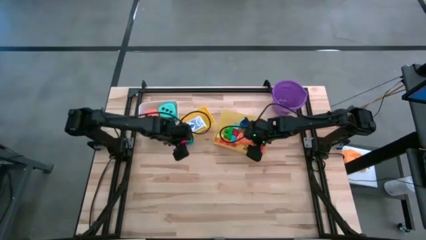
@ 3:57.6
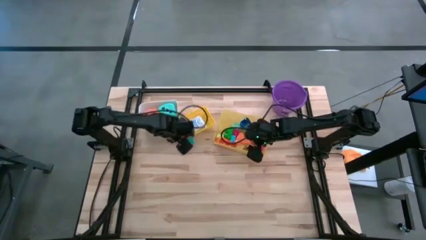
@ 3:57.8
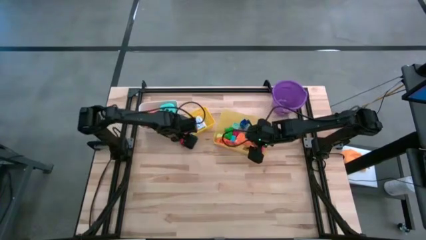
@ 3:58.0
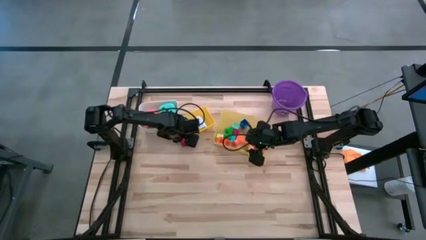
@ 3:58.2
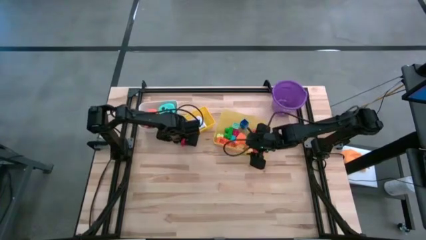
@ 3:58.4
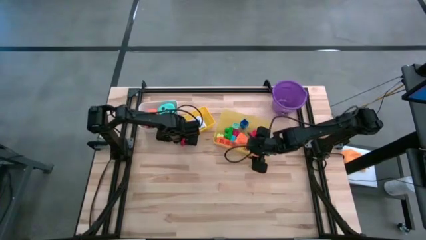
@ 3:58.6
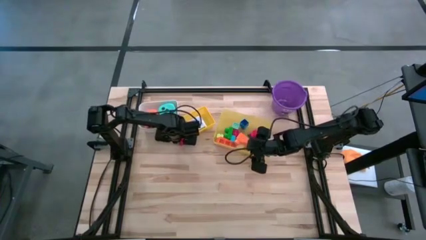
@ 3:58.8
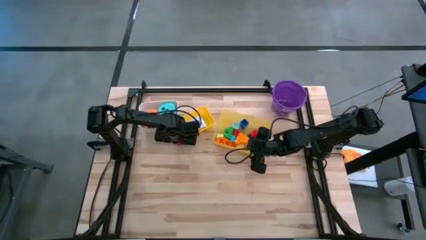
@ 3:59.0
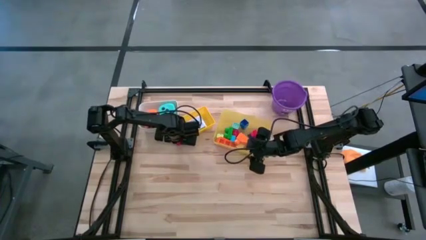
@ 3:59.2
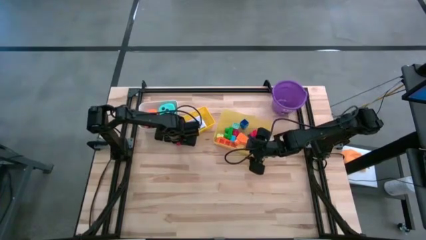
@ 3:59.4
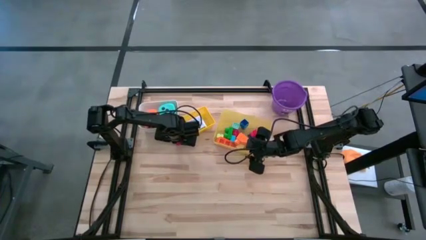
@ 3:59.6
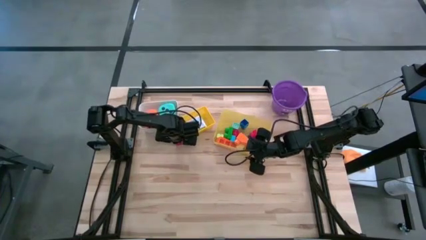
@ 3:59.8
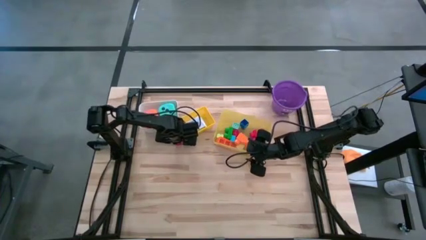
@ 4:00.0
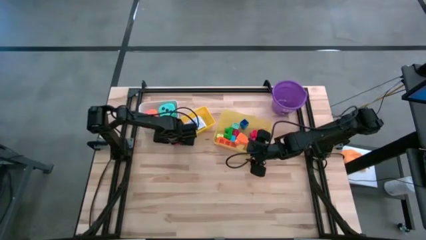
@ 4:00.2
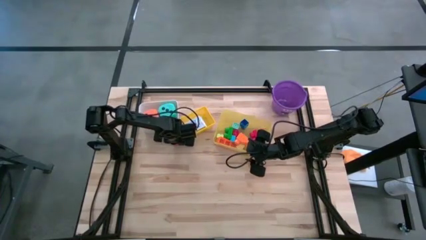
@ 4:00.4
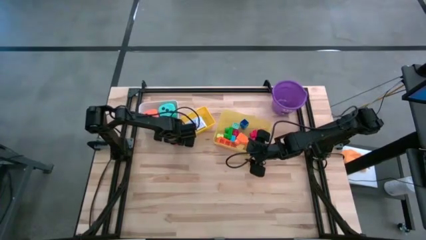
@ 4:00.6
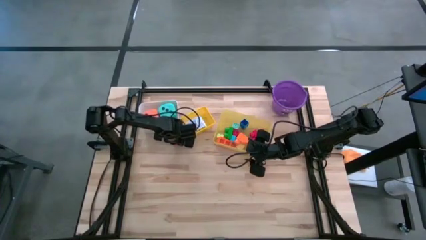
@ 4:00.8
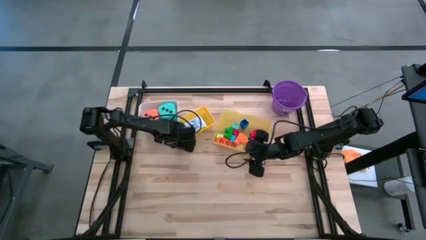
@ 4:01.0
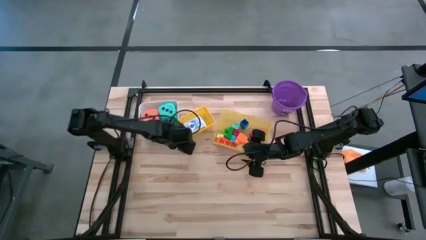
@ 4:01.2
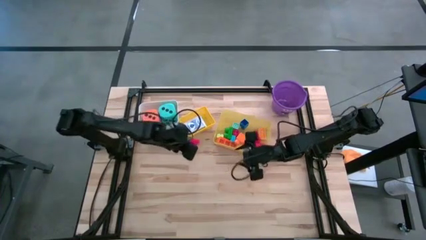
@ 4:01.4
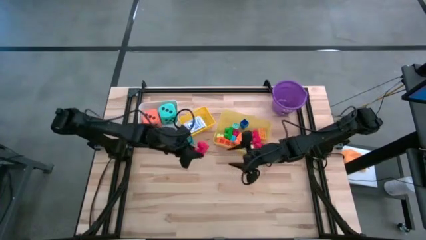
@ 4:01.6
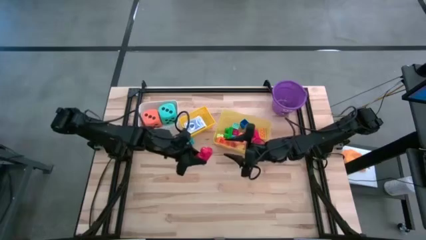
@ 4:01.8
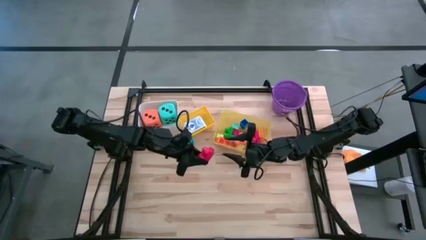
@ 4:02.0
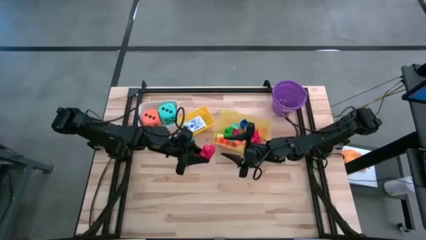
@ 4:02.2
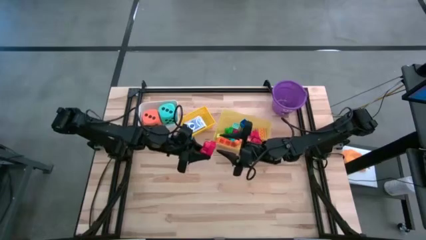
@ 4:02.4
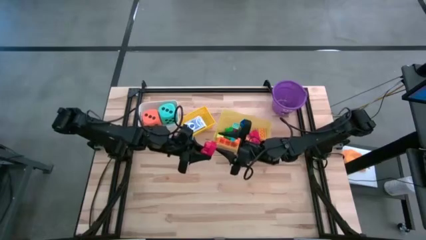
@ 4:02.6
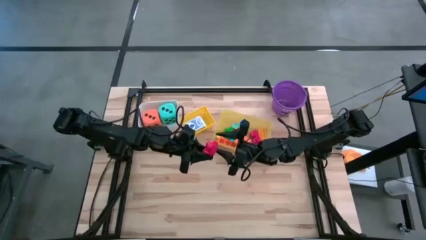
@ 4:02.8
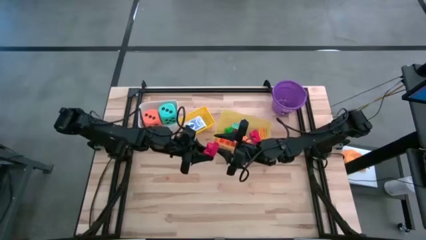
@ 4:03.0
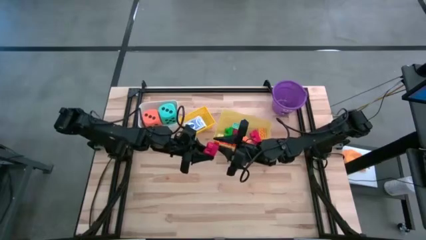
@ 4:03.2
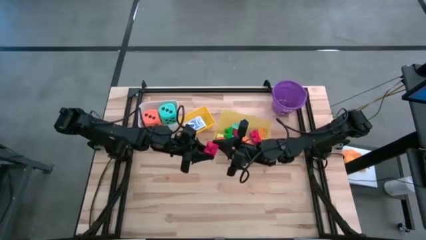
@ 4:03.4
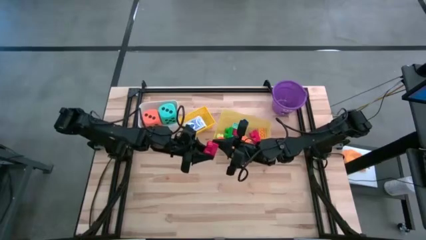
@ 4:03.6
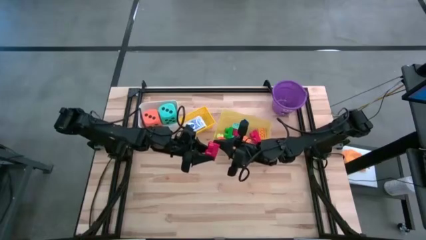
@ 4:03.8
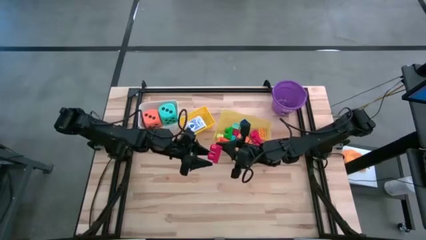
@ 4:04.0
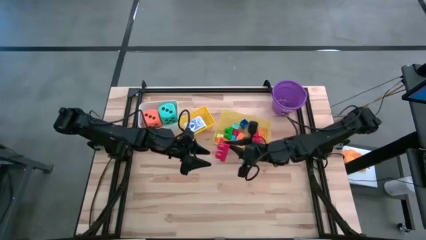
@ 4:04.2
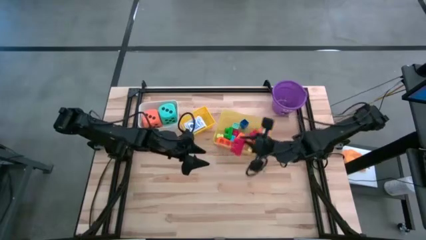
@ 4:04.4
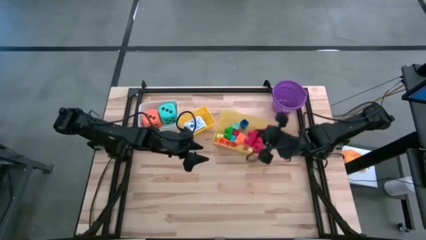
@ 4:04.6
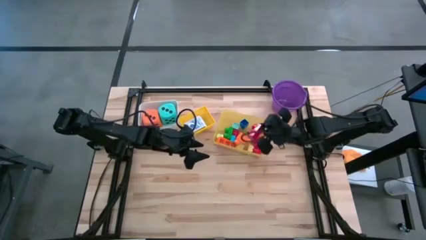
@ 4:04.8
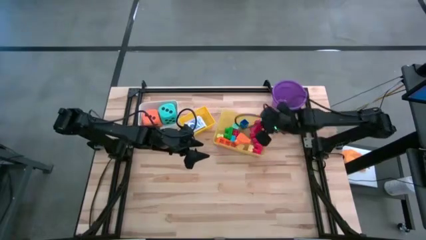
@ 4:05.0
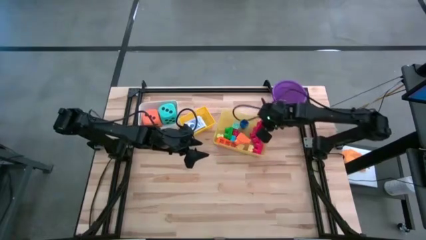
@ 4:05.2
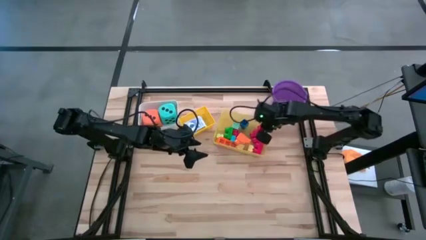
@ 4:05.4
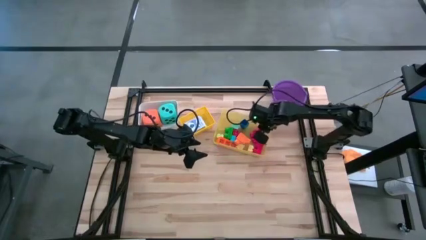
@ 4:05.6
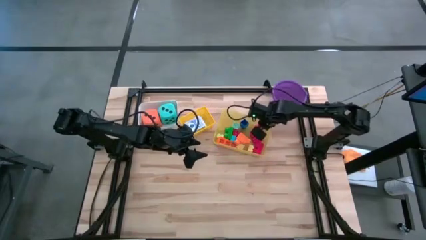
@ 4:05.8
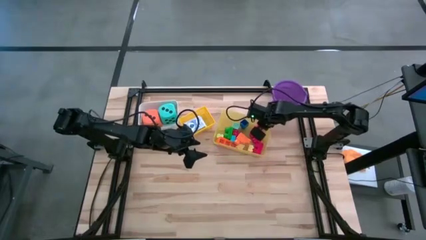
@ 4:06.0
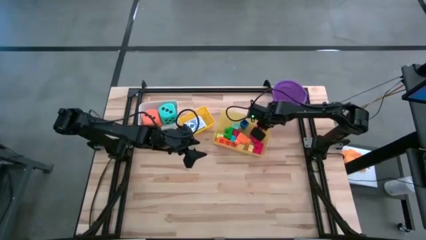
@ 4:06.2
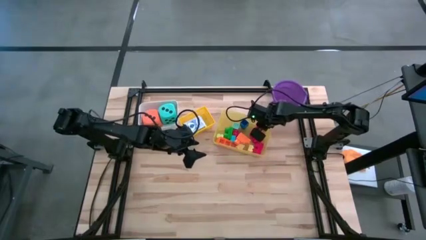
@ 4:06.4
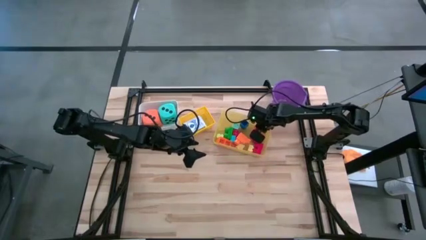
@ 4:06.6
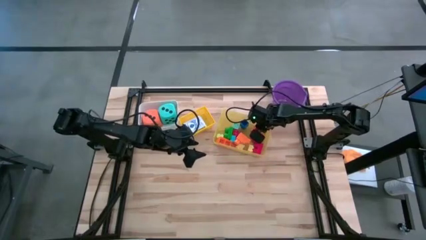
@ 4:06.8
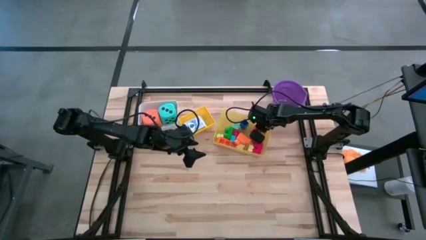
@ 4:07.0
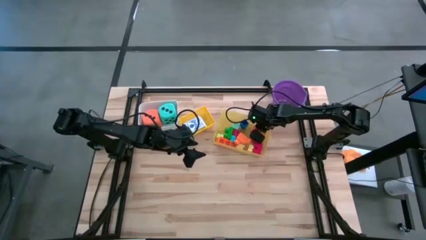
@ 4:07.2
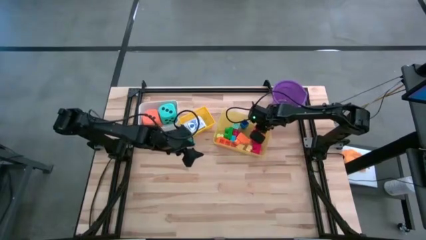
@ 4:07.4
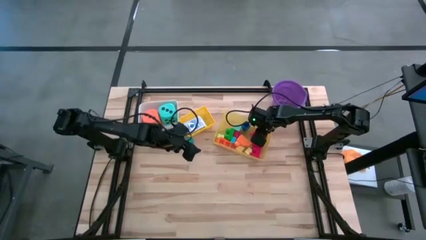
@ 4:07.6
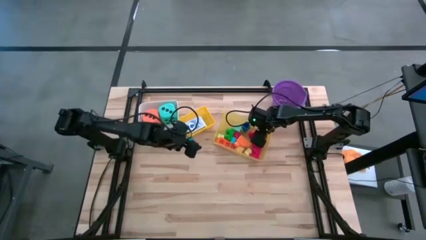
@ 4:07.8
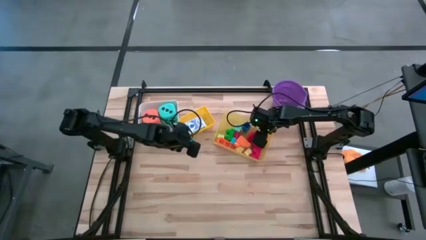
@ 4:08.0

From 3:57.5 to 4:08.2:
Task: Pick & Place Toys
Put the red game piece into the yellow bin

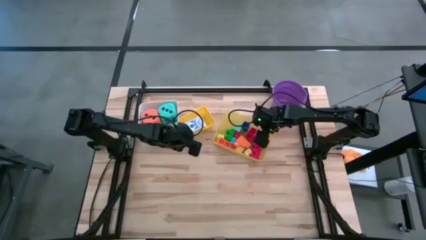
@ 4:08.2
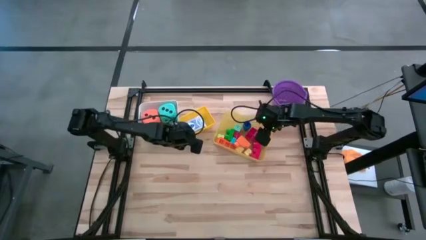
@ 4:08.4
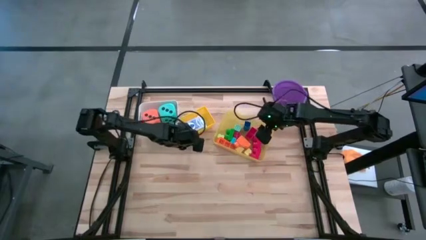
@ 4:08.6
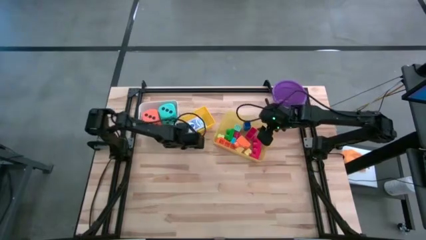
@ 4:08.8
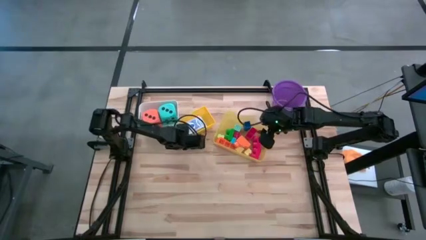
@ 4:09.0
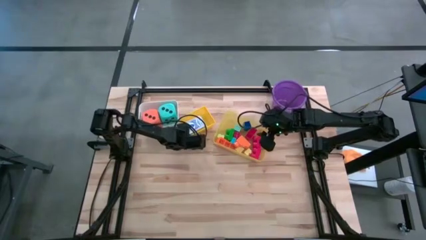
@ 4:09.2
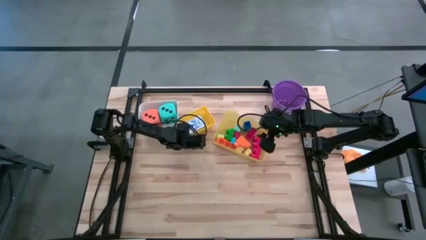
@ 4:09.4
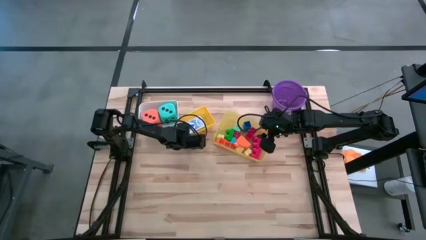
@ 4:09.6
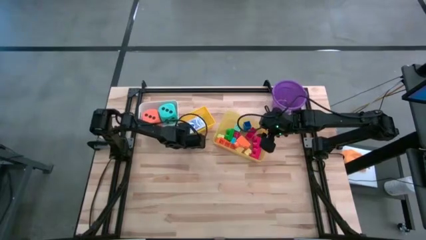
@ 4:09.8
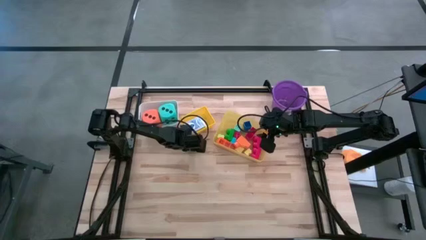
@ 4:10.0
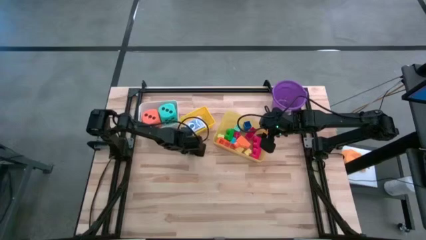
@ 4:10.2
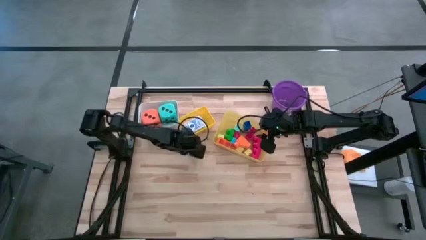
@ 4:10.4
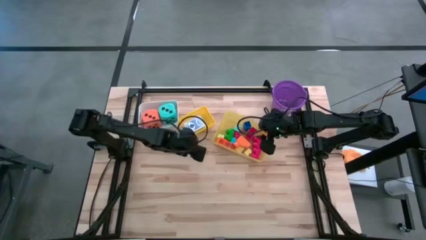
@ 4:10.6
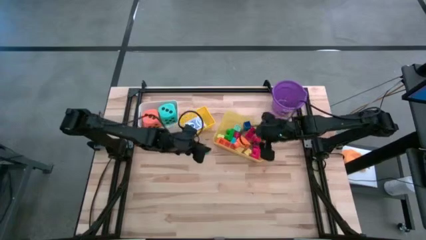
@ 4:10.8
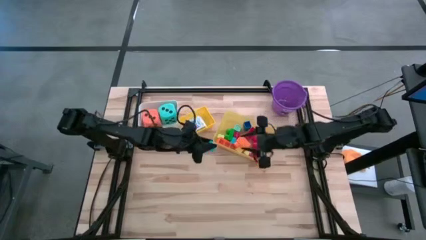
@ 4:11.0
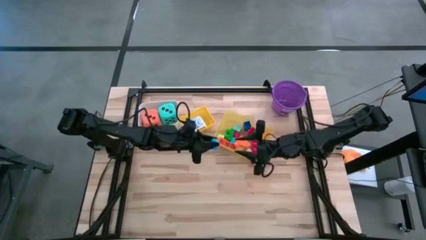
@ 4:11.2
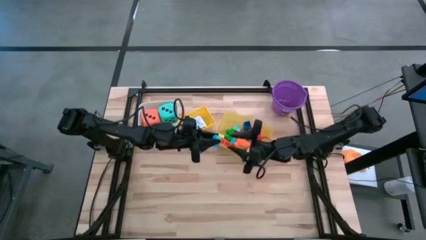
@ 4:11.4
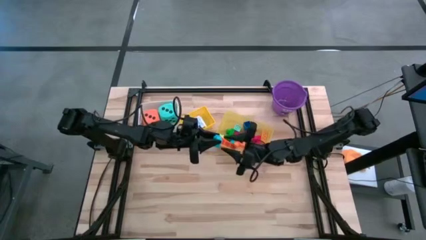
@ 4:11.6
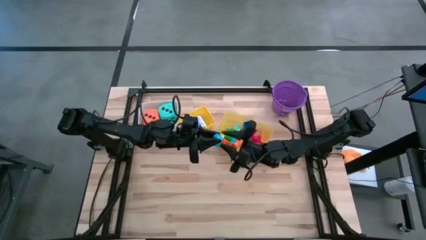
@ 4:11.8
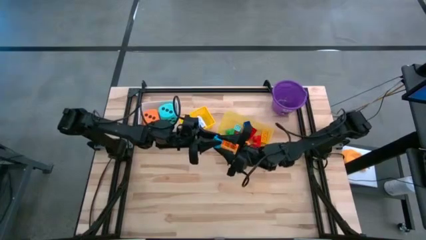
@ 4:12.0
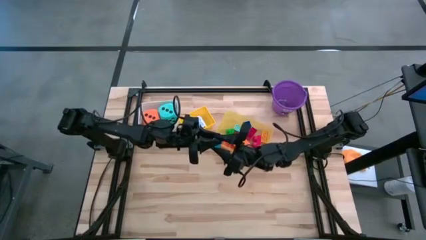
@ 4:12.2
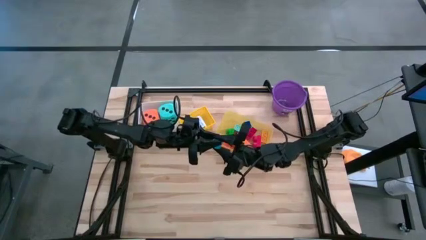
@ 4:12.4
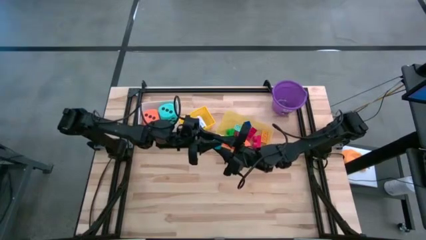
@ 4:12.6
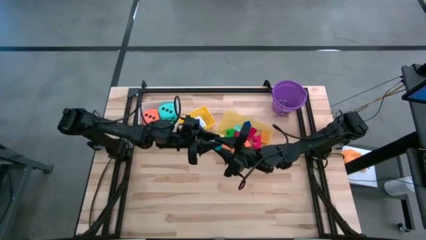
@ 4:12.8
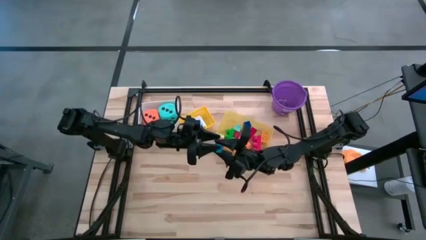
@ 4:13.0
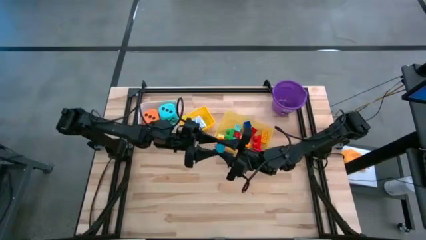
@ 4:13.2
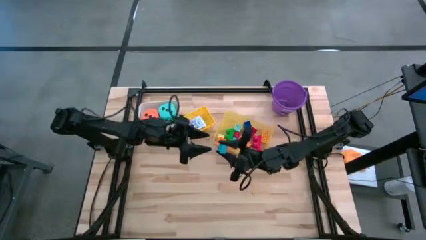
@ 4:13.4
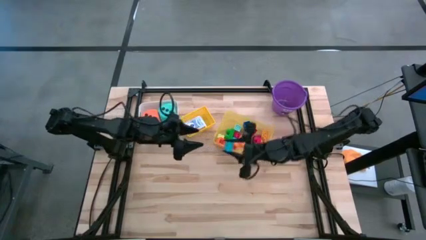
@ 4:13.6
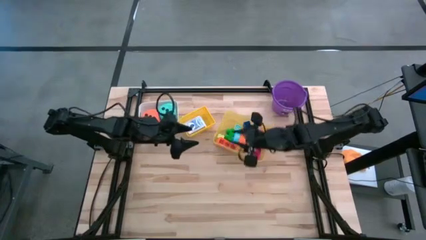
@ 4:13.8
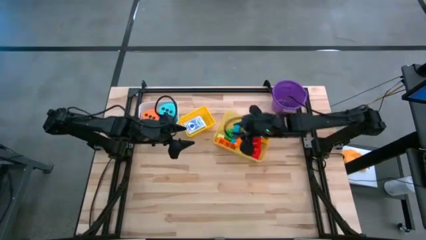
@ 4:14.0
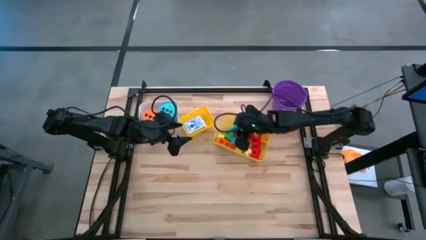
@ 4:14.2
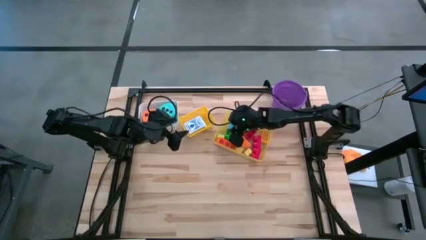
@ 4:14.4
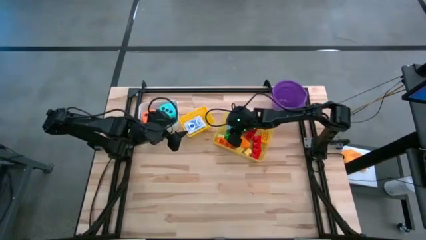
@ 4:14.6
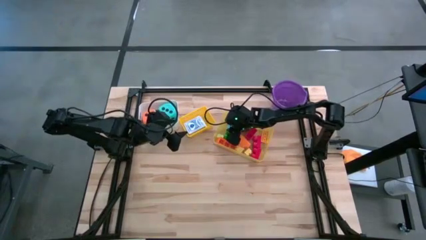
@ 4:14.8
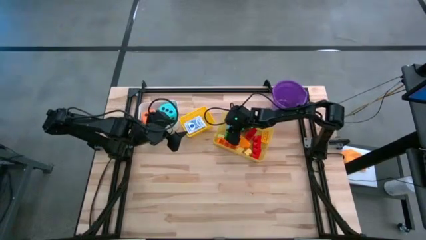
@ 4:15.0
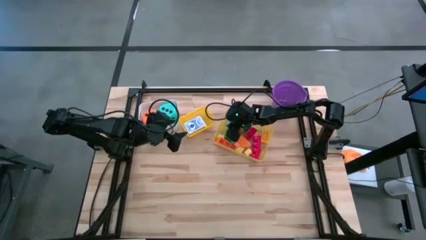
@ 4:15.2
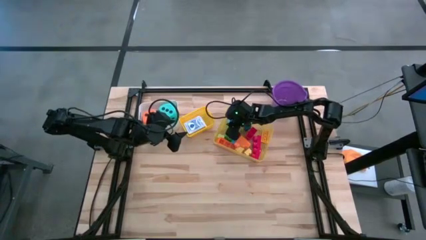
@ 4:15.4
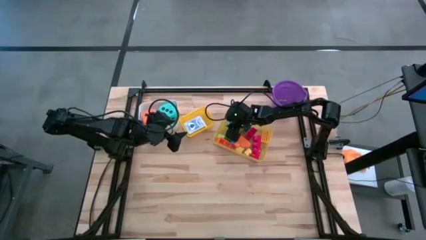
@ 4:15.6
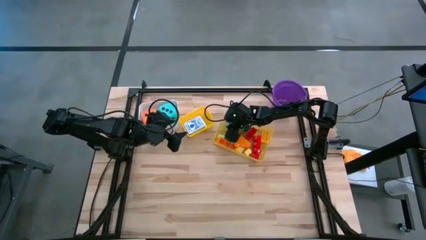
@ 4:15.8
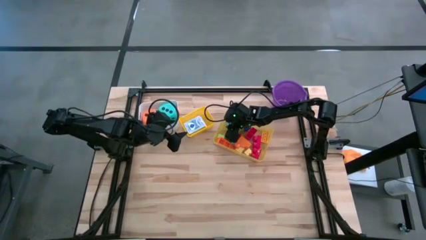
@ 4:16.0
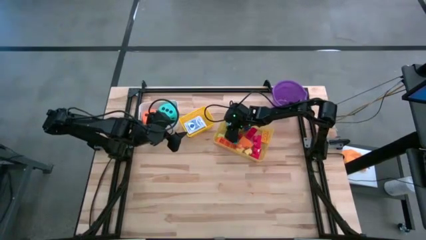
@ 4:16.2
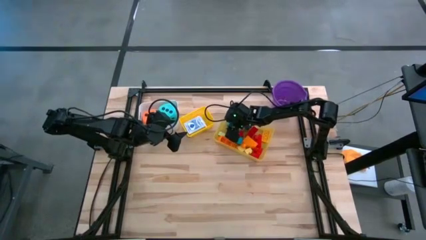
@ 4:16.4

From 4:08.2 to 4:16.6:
Put the blue game piece into the yellow bin
